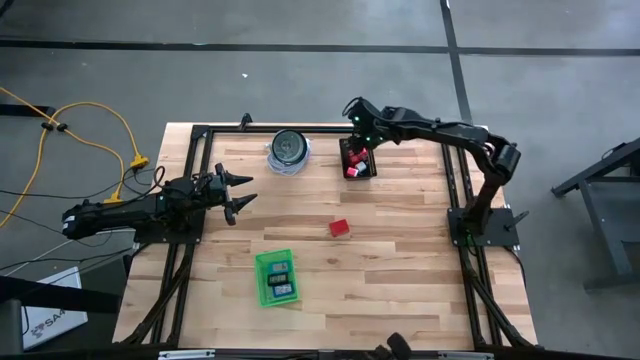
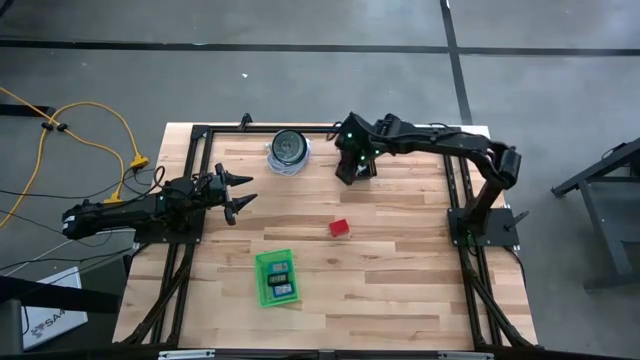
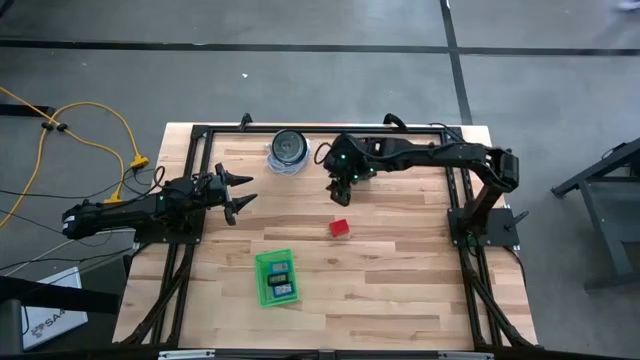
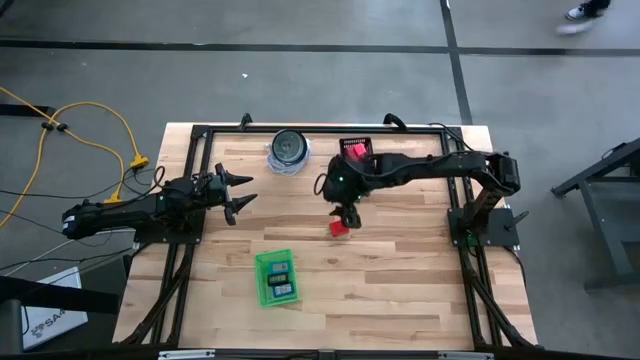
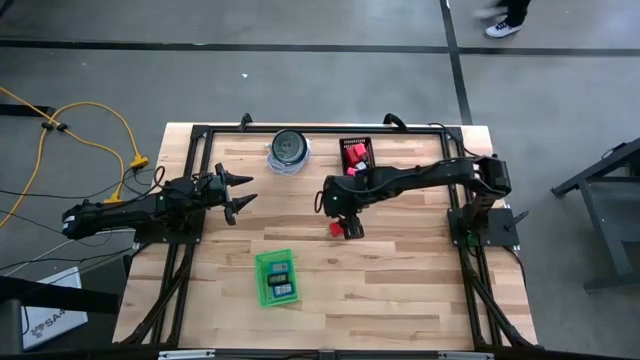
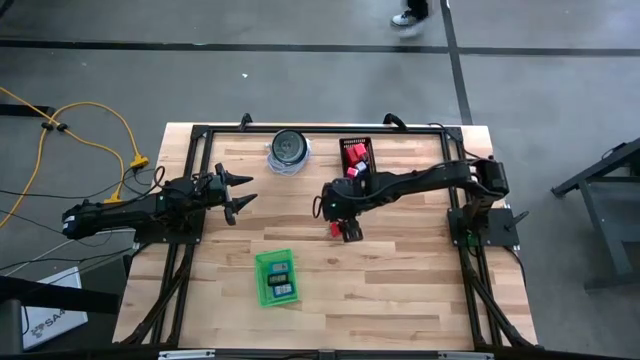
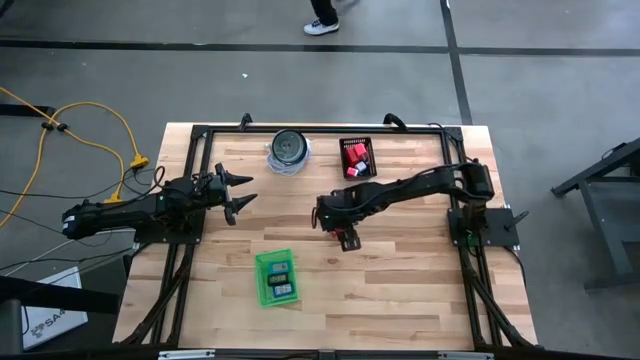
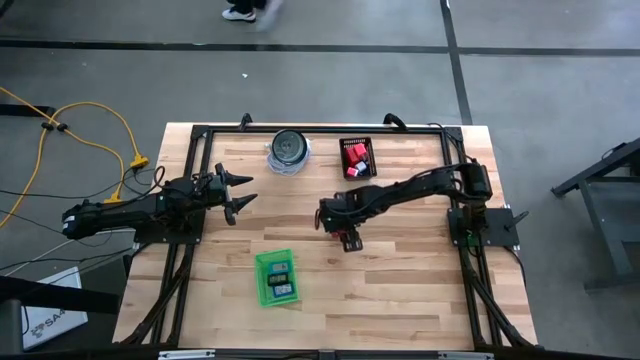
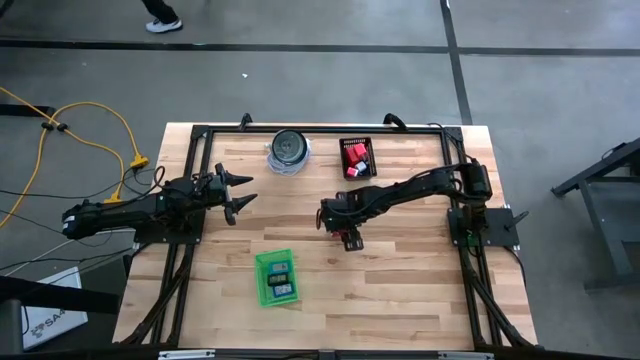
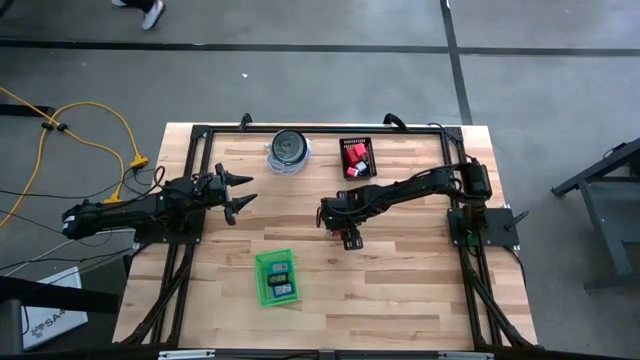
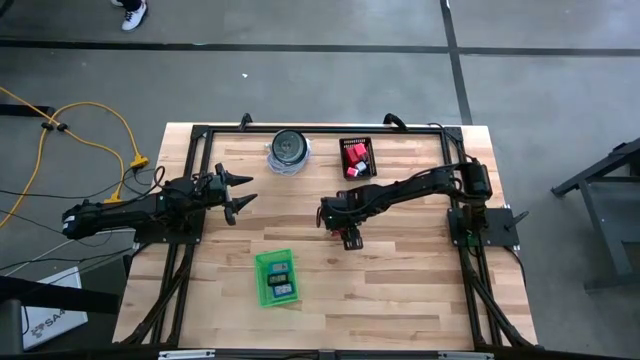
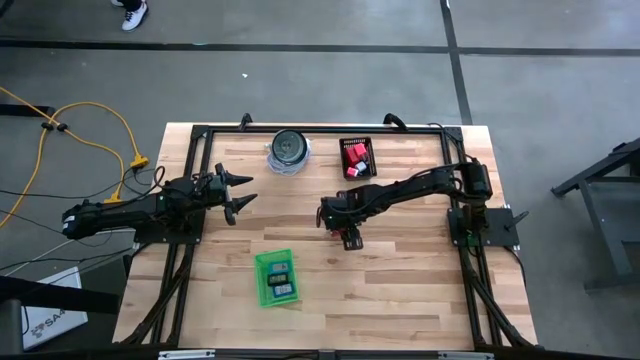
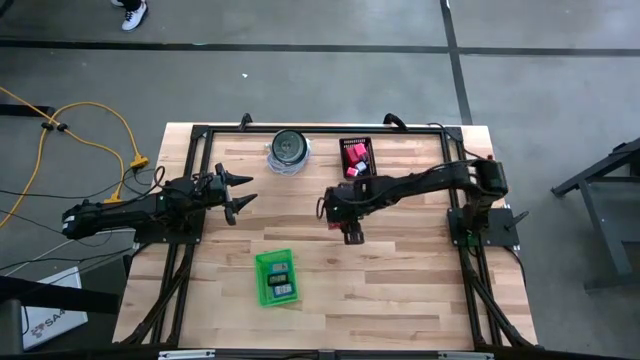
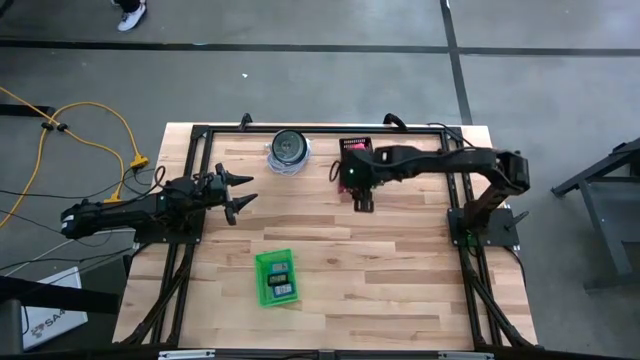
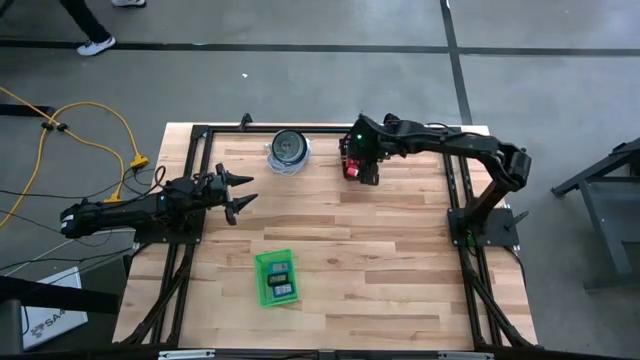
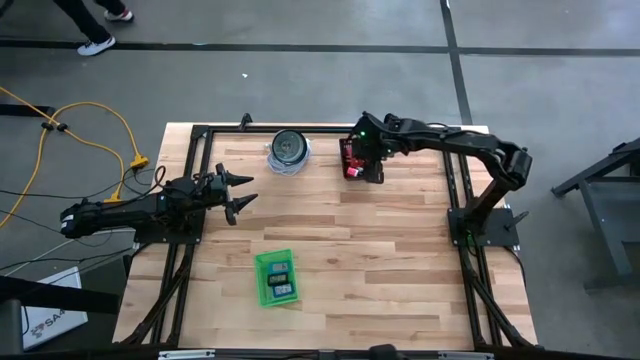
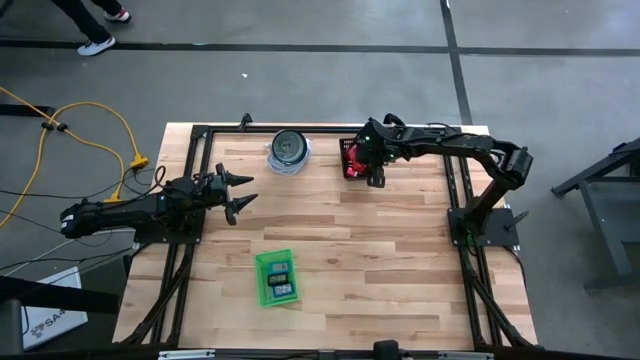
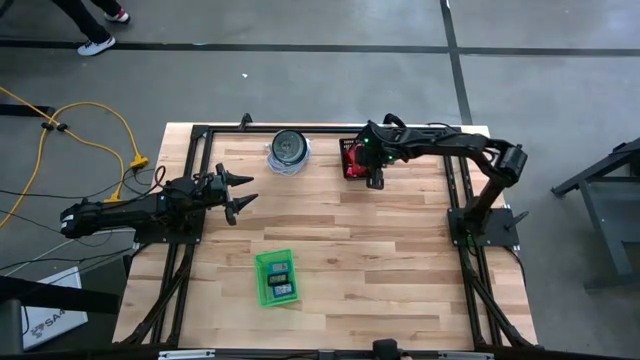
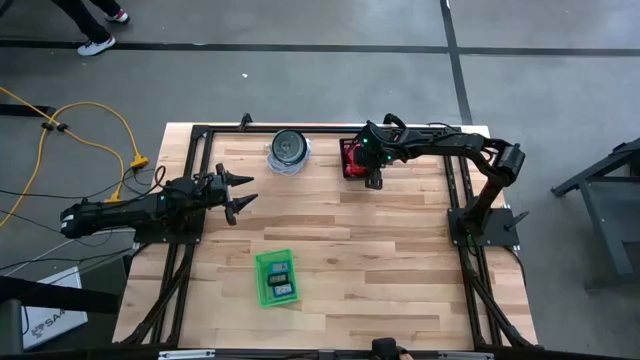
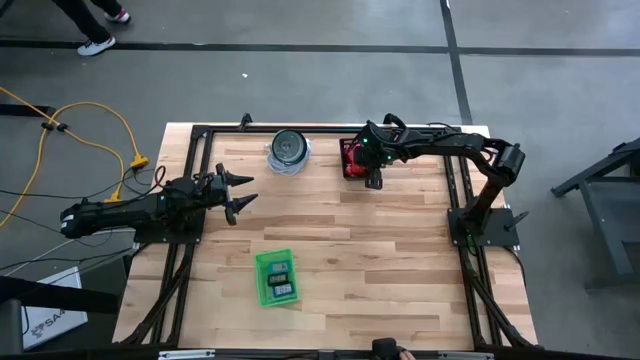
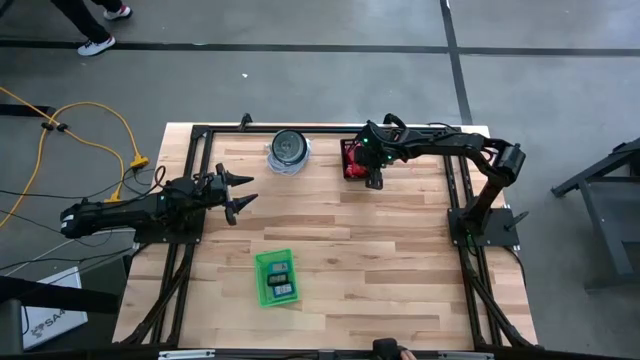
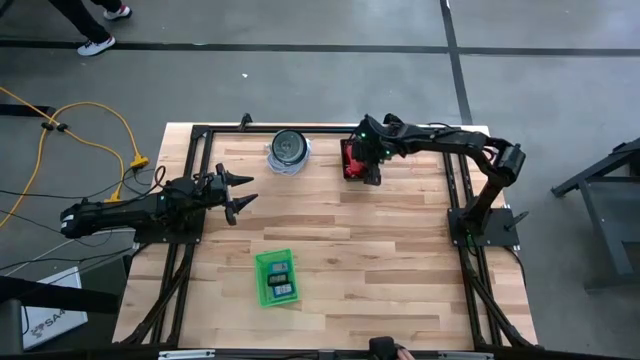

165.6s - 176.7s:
Task: Pick & Place Office items
Put the red charger adapter into the black bin

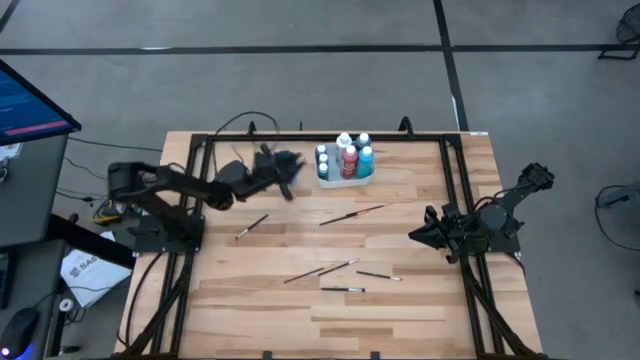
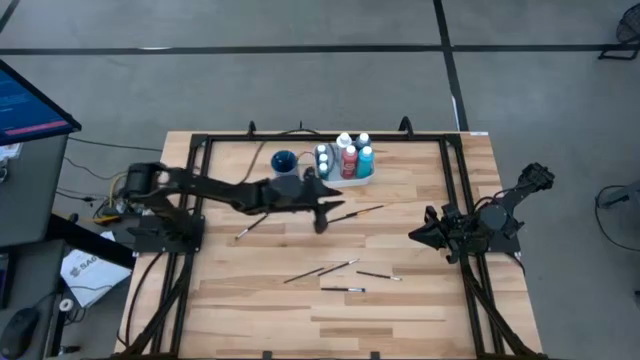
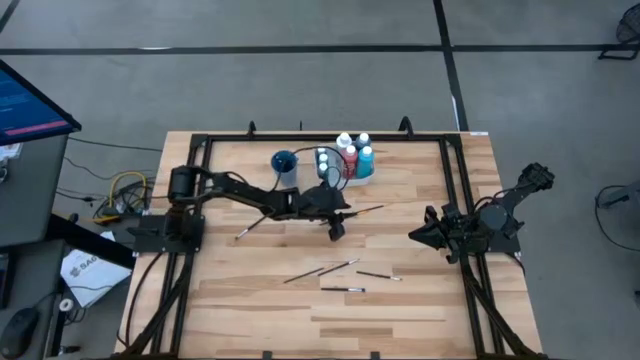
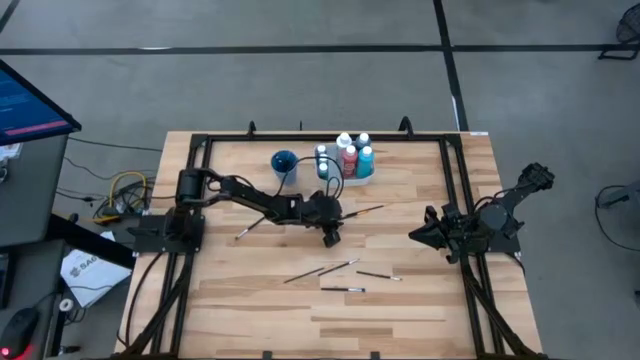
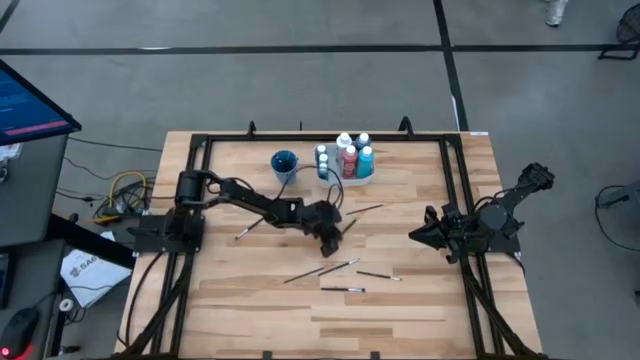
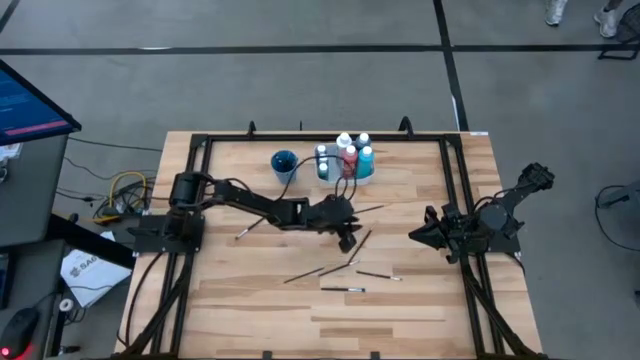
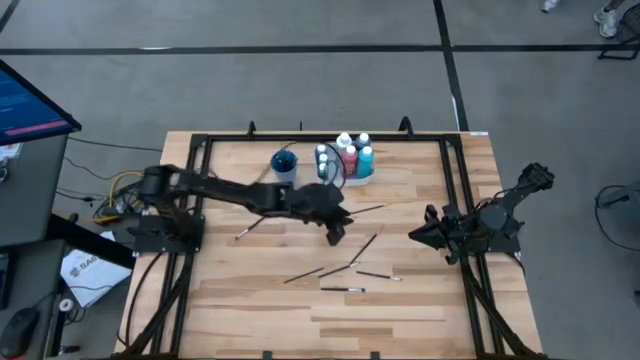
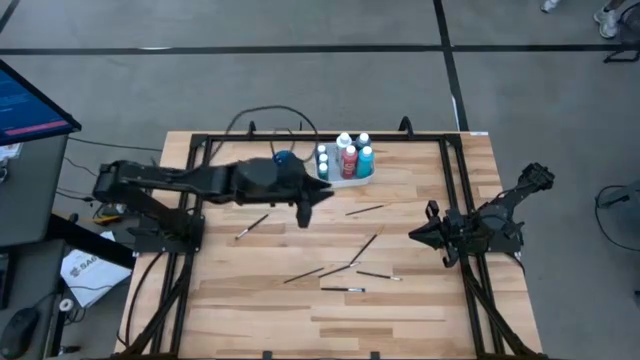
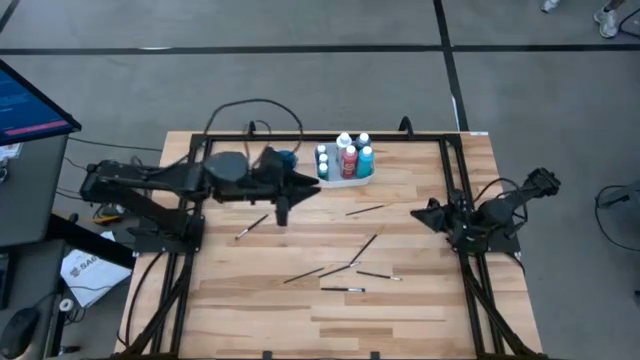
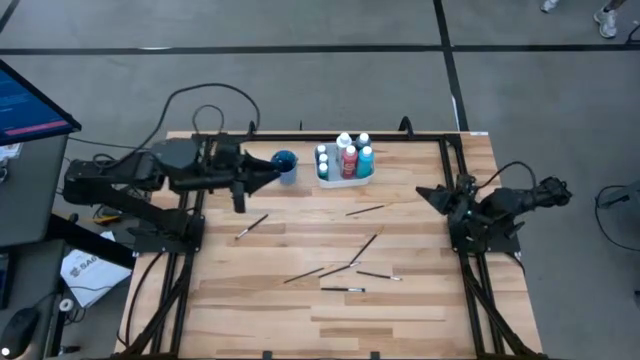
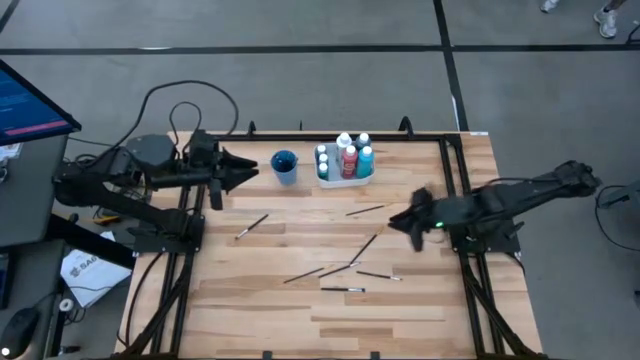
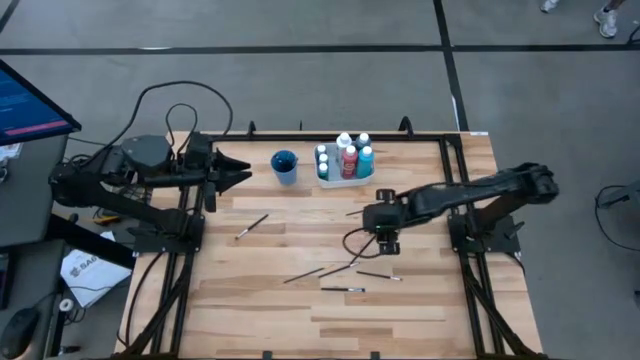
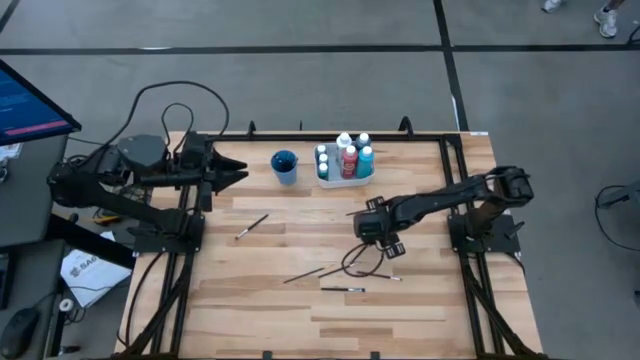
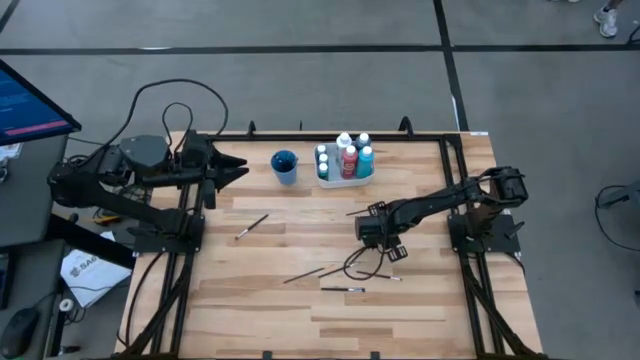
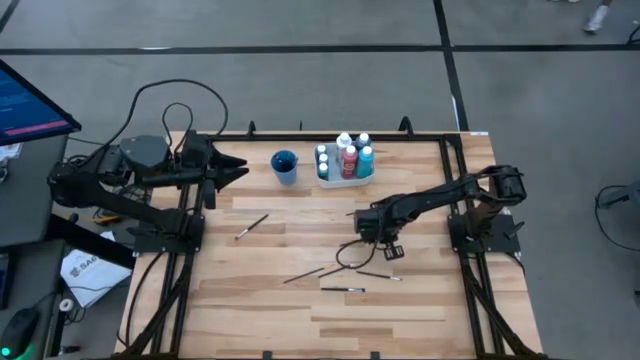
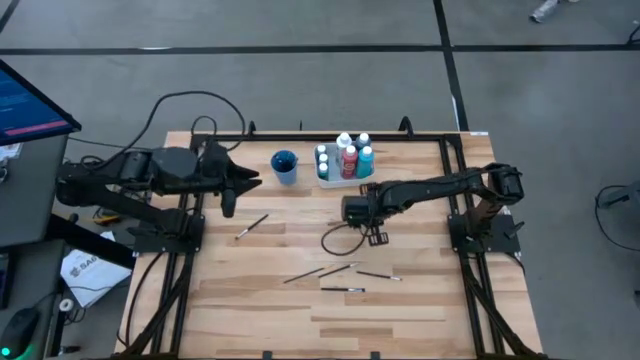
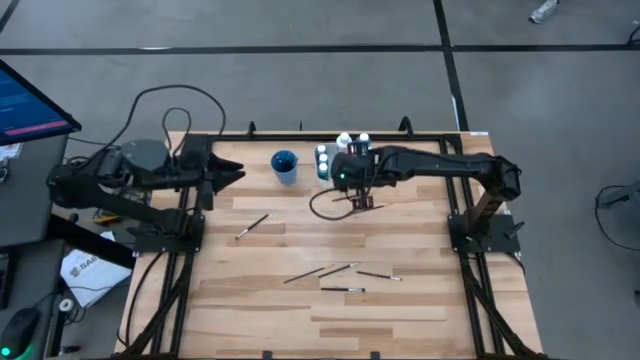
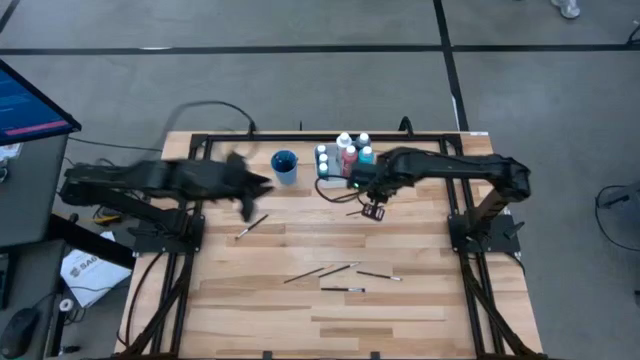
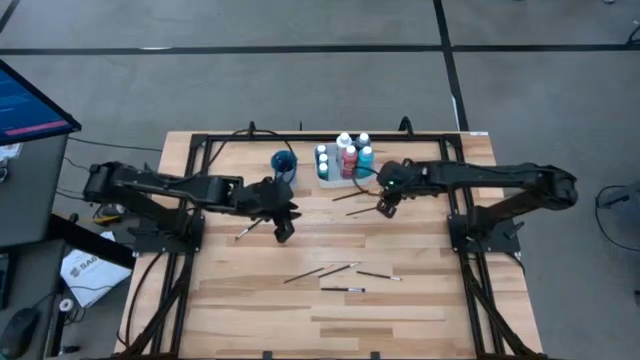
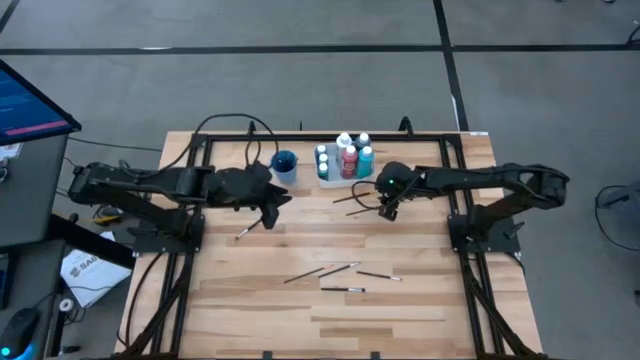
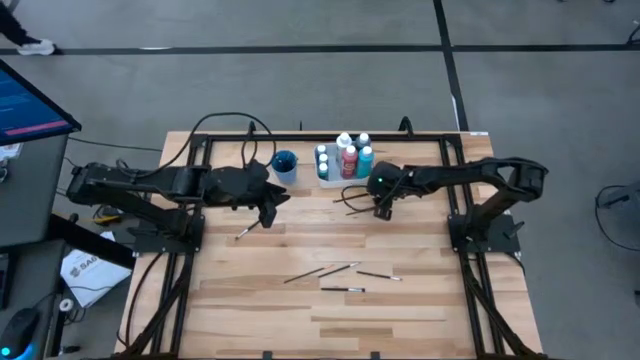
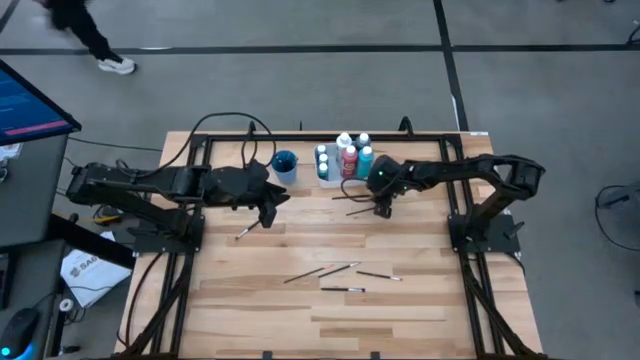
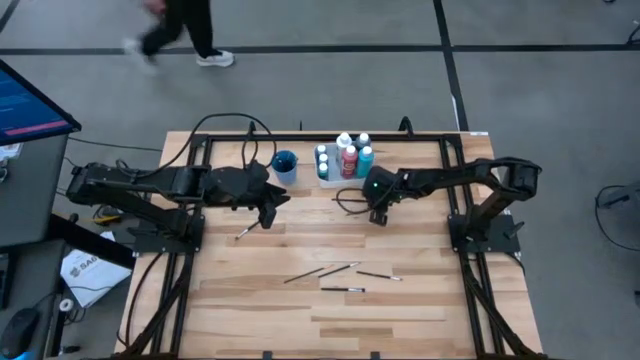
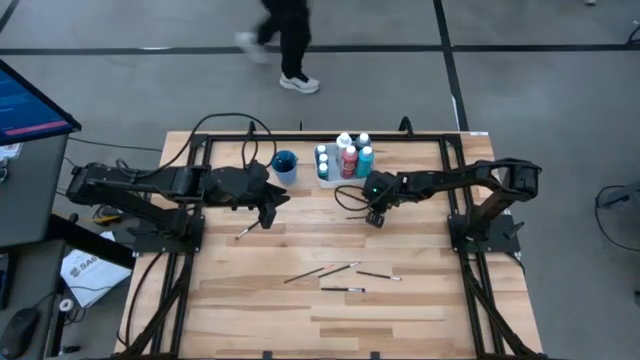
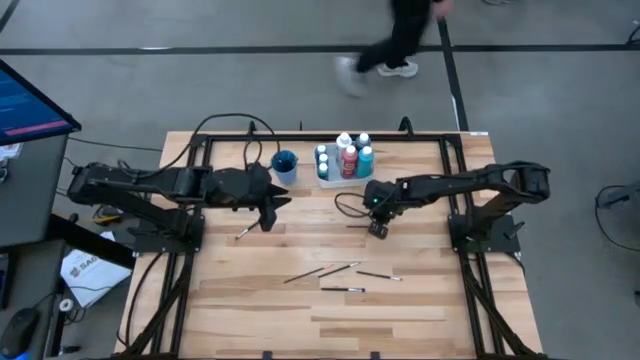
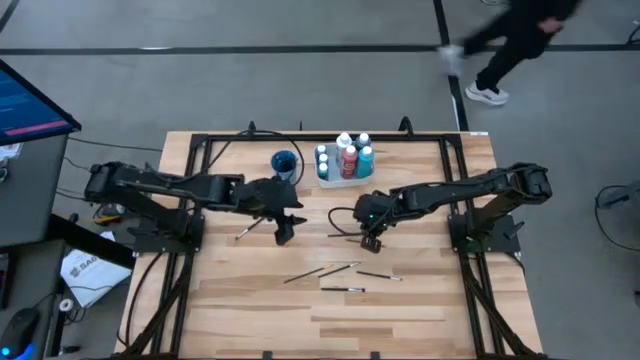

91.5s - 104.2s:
Task: Pick & Place Paint Supplies
Put the gold and black paint brush into the blue cup
